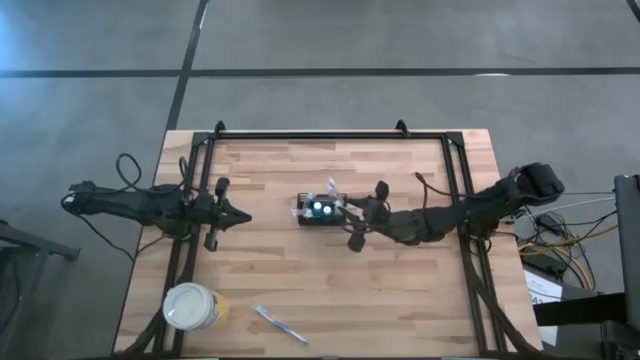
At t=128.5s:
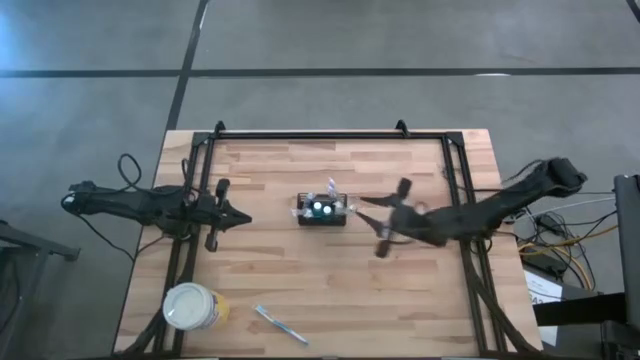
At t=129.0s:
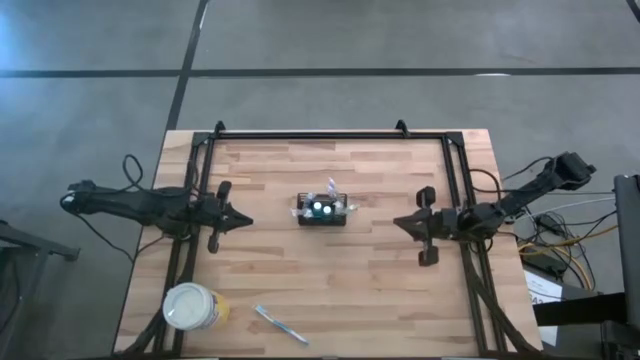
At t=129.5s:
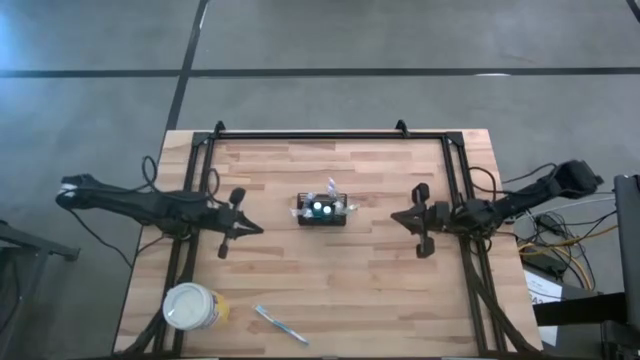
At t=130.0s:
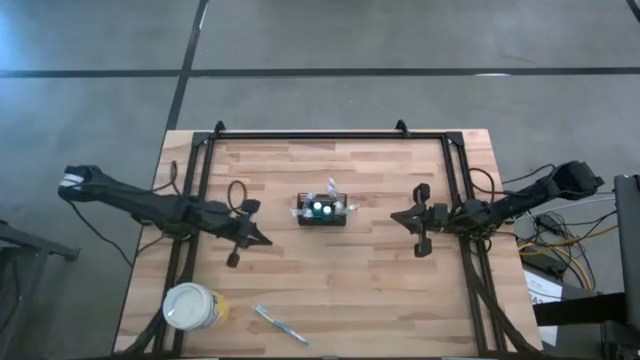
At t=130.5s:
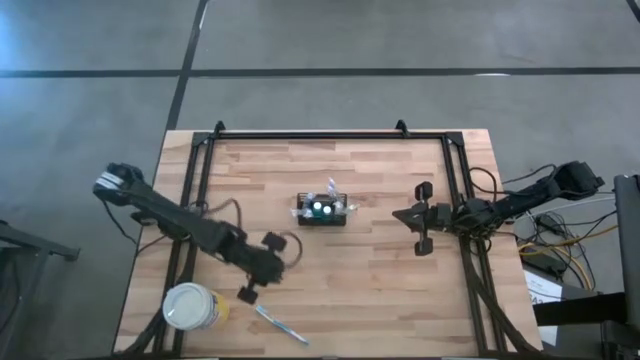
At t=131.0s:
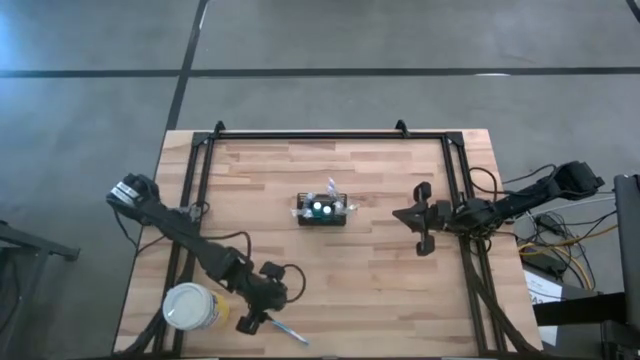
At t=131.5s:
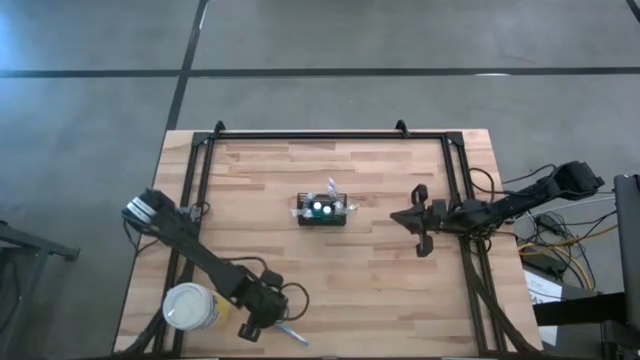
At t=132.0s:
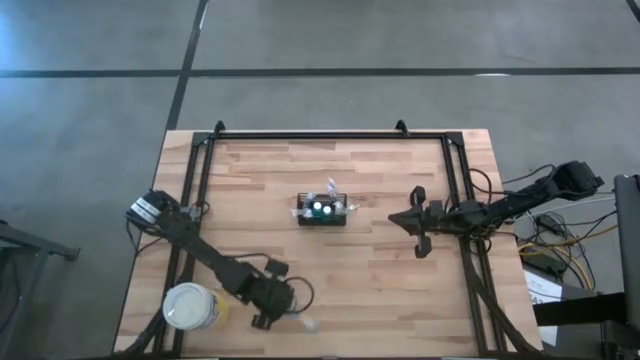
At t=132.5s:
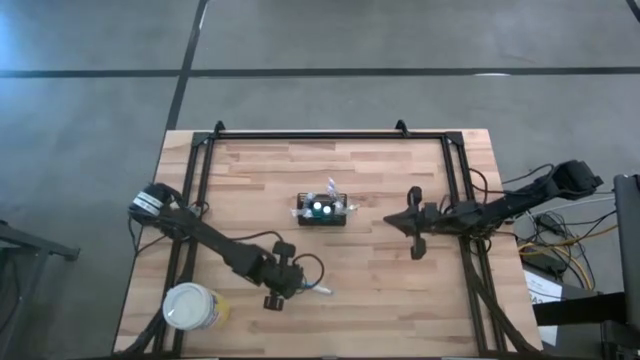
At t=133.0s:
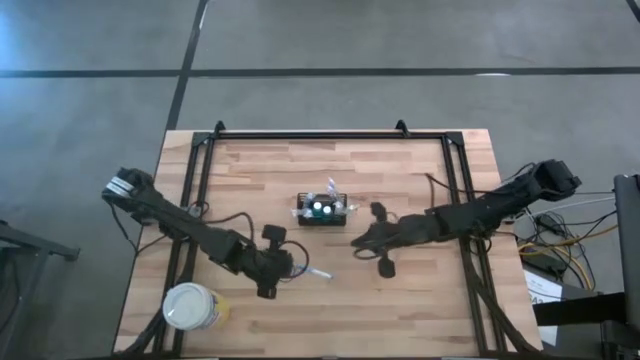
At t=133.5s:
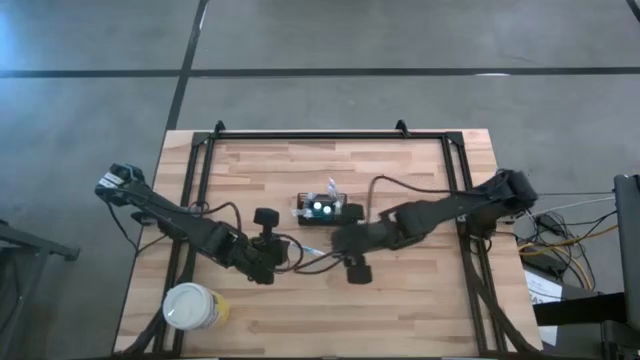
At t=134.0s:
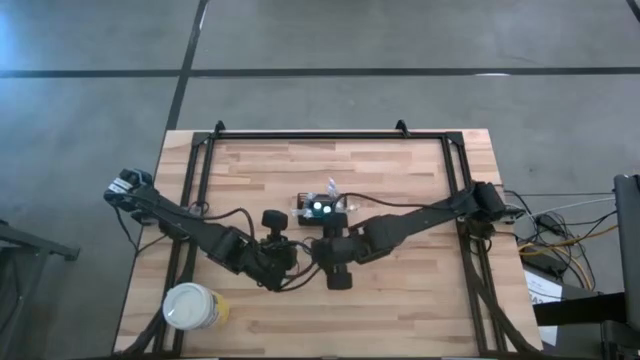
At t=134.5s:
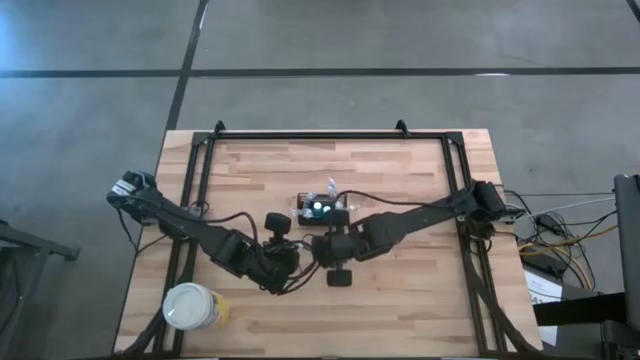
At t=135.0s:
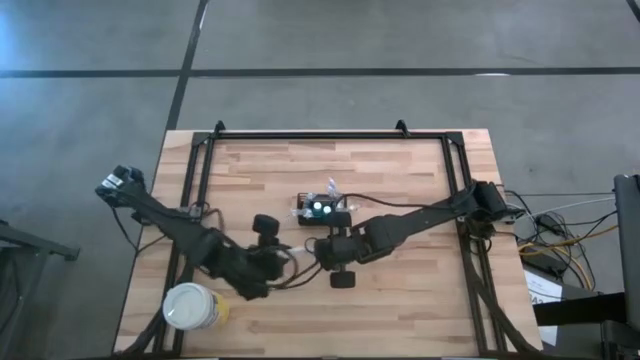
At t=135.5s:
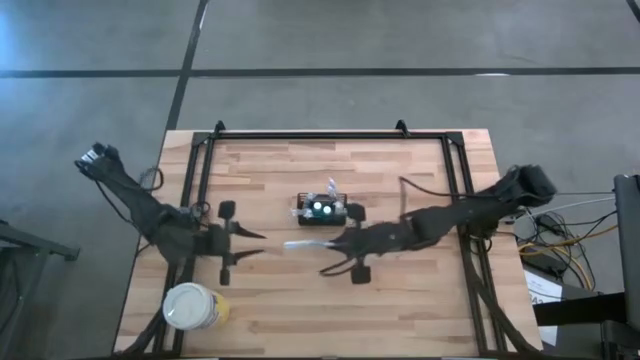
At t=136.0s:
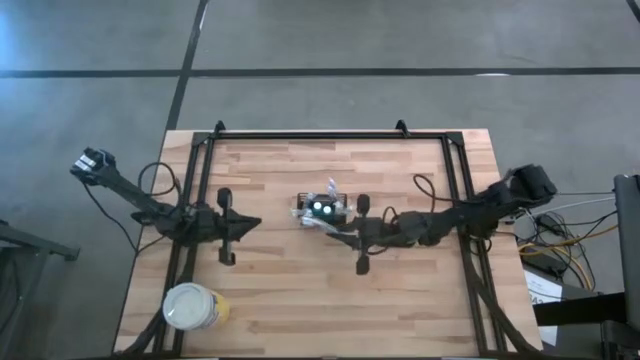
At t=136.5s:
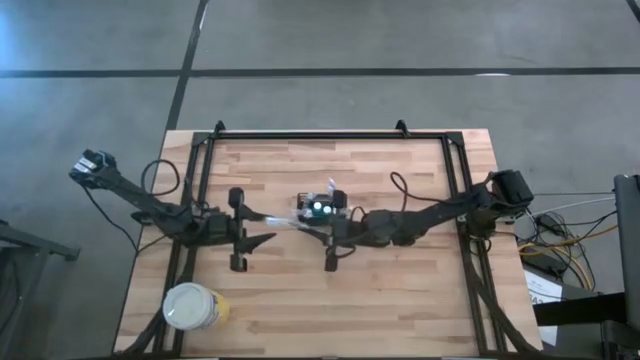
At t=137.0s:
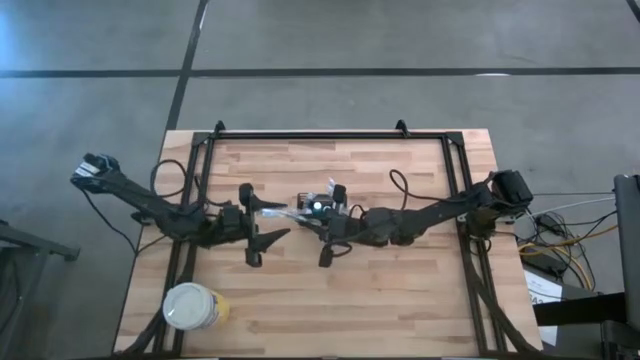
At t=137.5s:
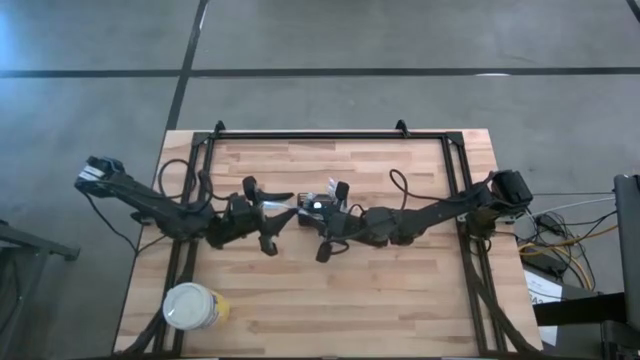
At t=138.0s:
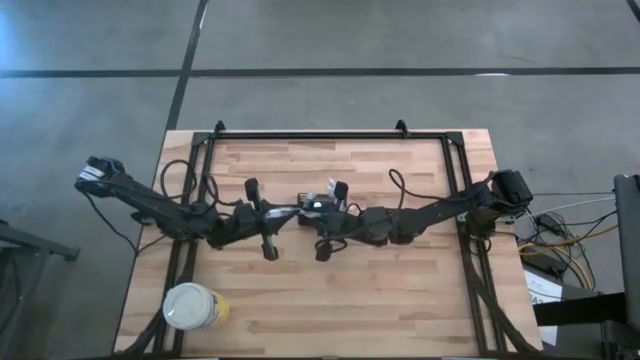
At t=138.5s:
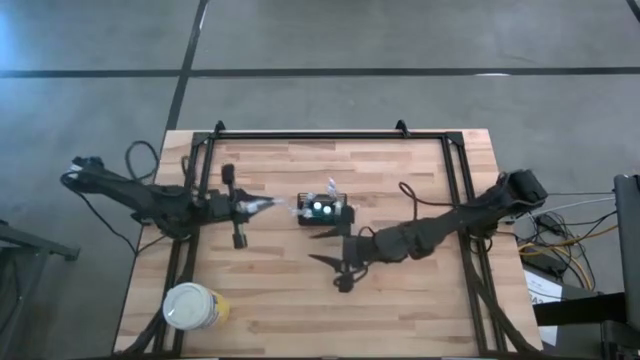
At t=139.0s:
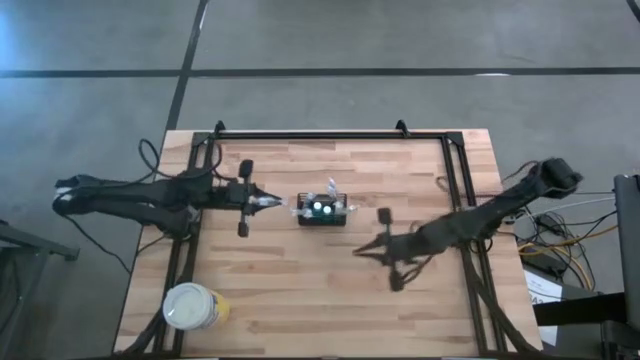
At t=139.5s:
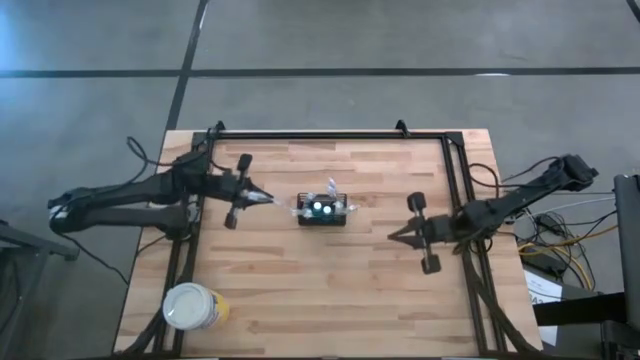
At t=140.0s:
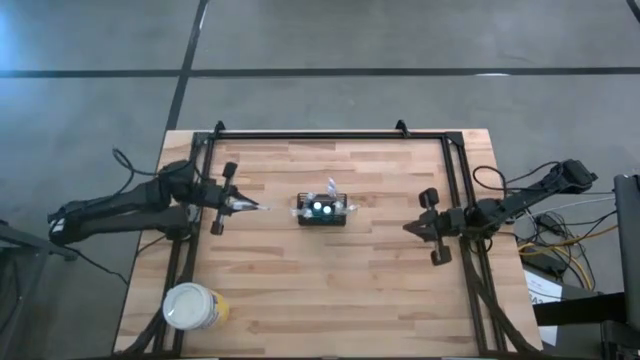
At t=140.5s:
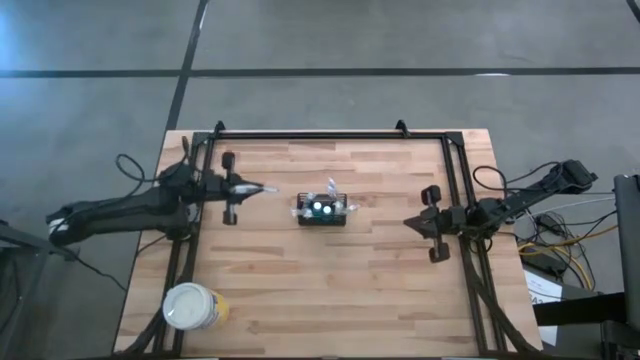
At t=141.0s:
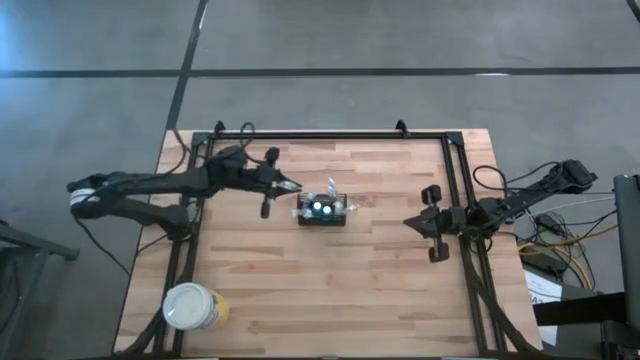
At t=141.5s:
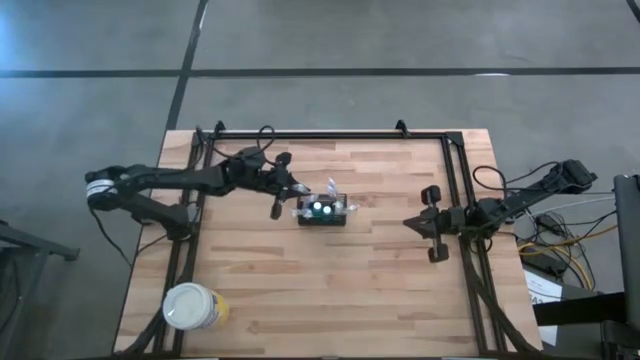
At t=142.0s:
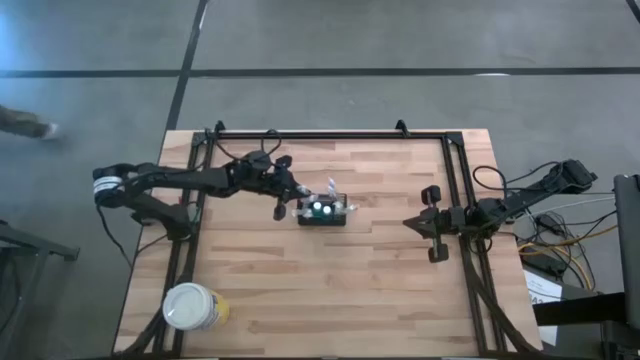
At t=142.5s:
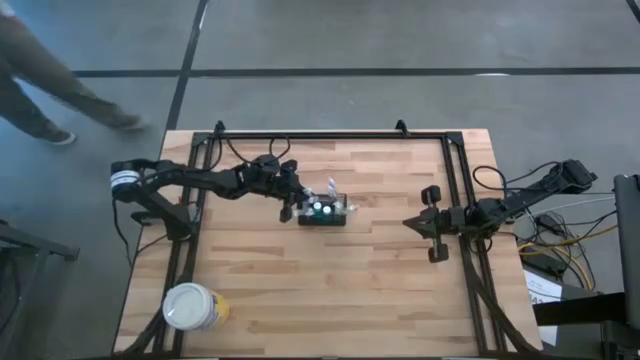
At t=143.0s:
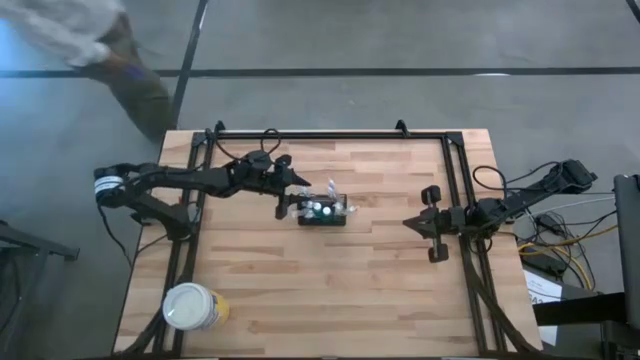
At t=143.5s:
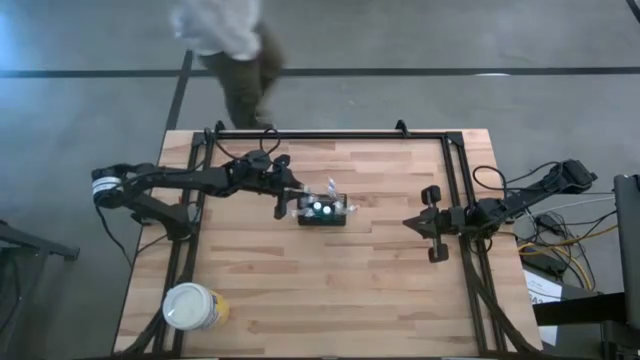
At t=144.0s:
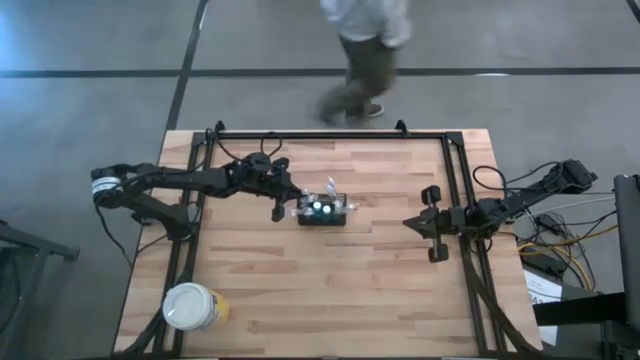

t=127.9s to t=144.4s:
Task: Pick & Place toothbrushing station
Put the blue toothbrush into the black wire organizer

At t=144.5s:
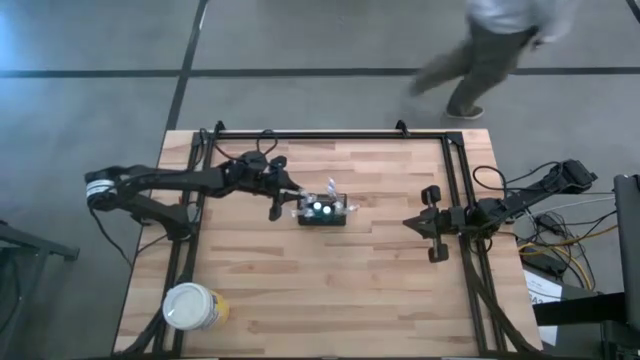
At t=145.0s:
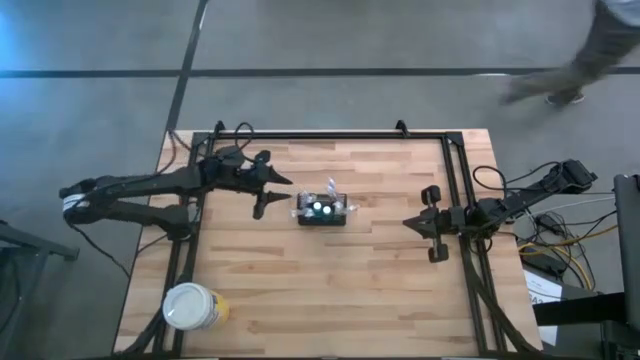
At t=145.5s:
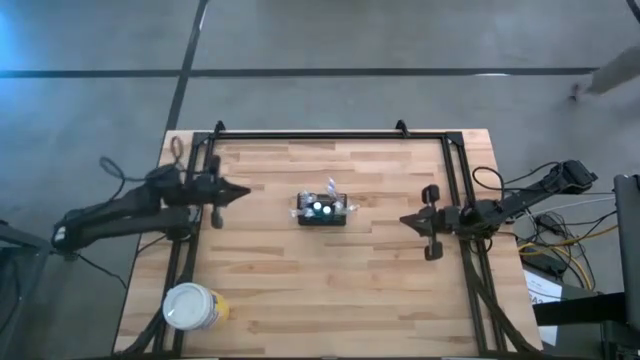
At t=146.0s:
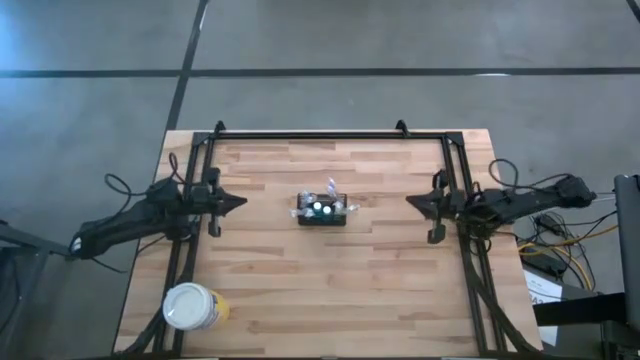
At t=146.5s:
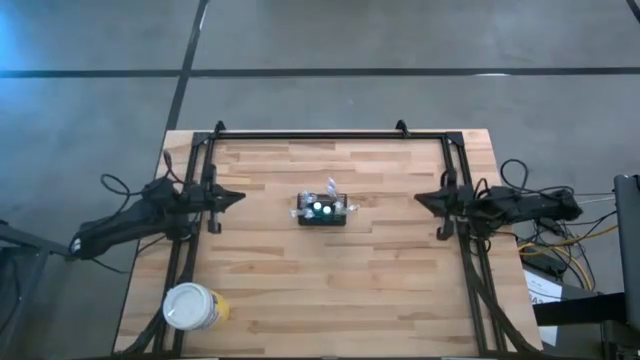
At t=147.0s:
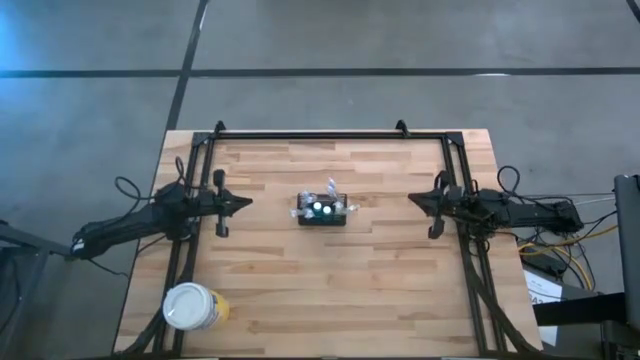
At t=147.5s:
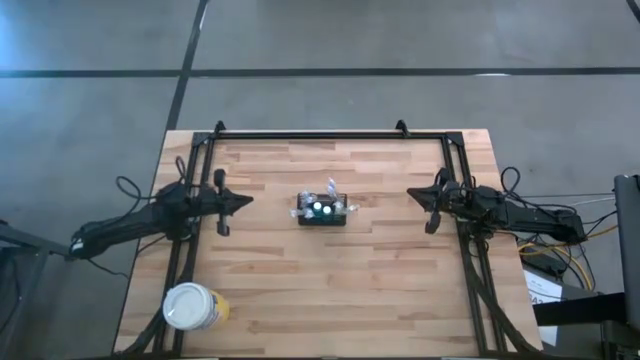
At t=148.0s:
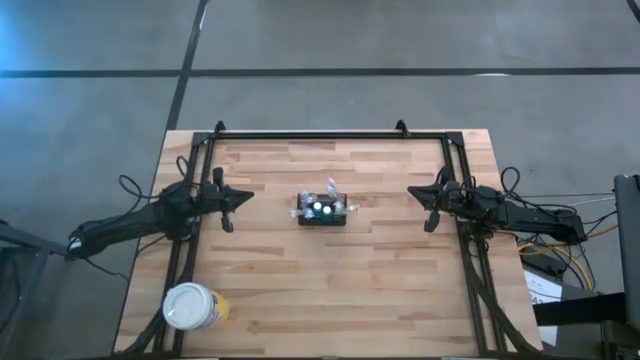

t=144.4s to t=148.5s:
Return to Home Position
